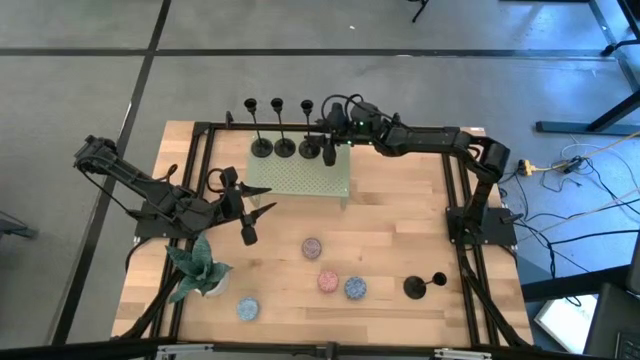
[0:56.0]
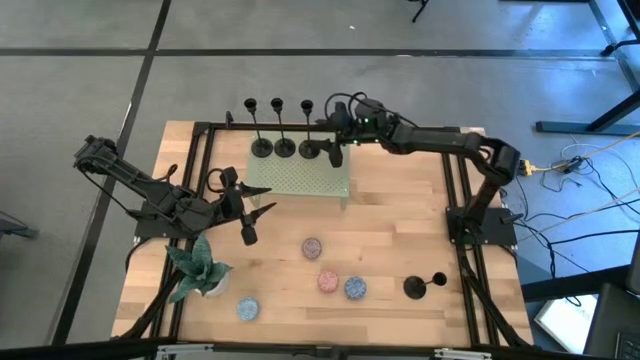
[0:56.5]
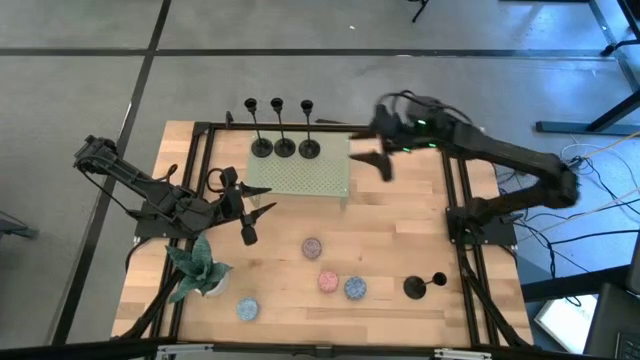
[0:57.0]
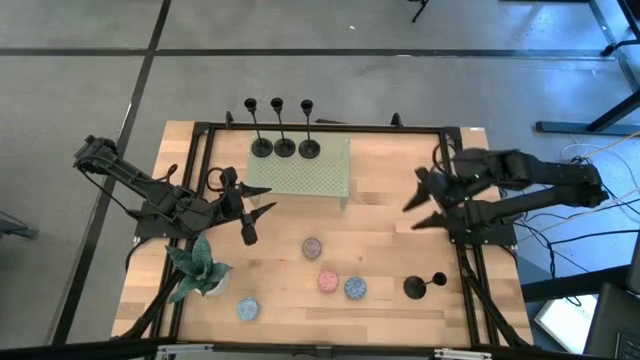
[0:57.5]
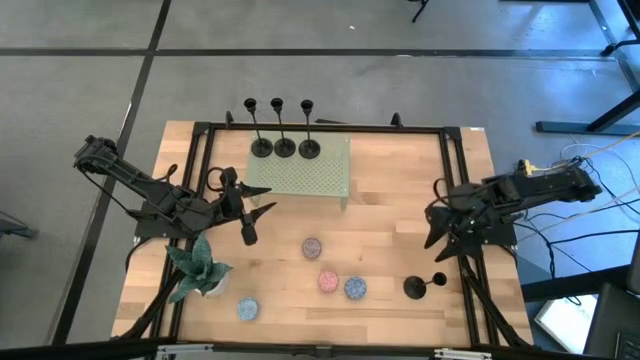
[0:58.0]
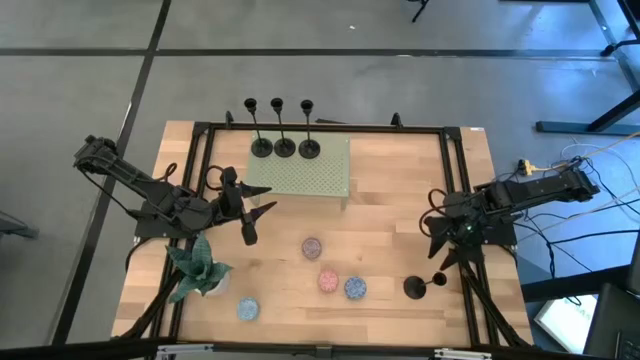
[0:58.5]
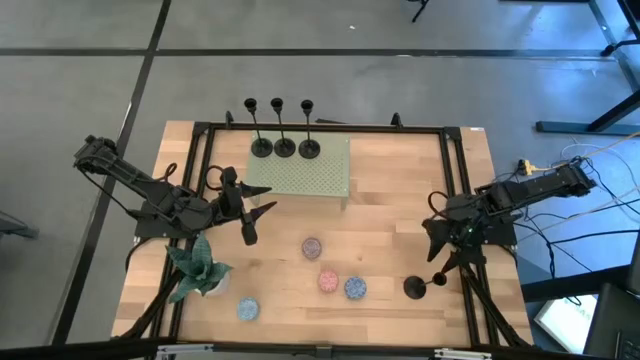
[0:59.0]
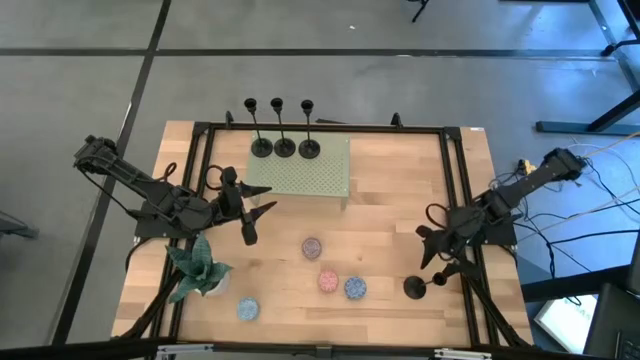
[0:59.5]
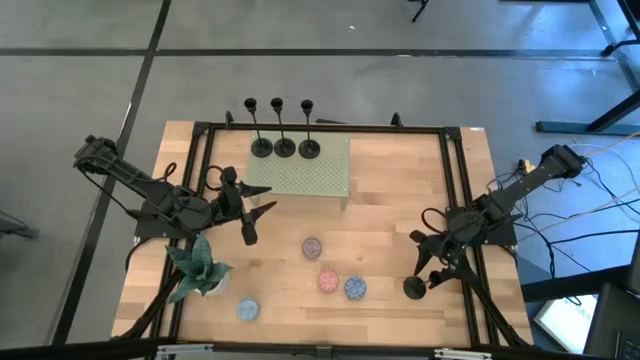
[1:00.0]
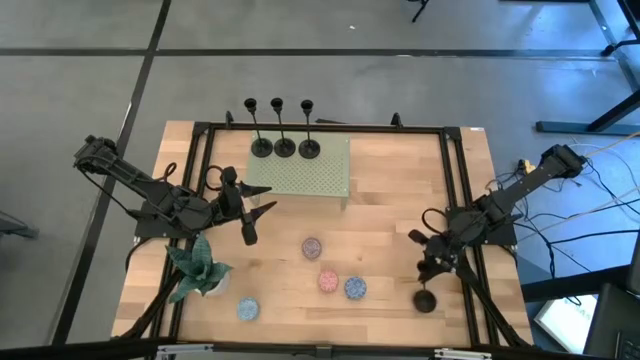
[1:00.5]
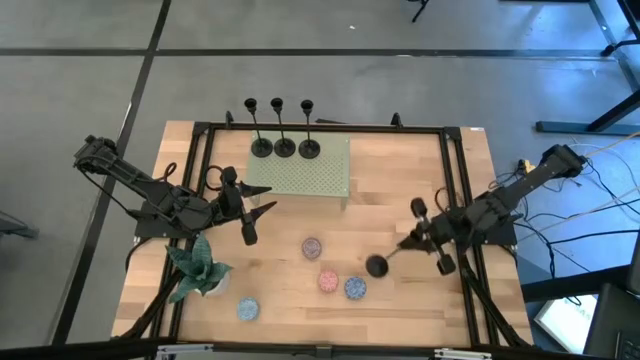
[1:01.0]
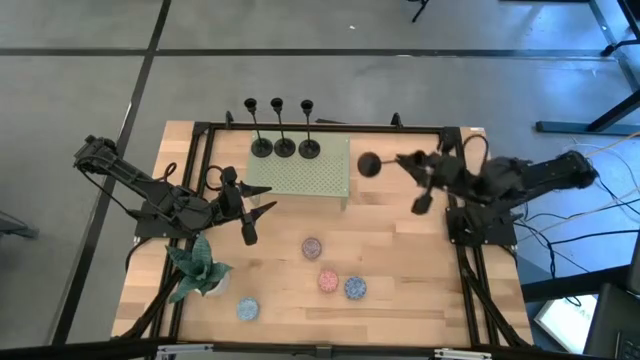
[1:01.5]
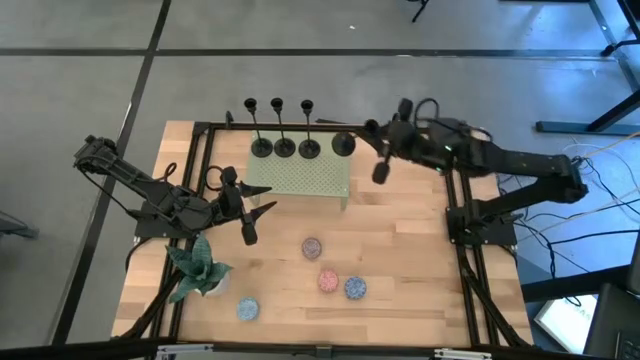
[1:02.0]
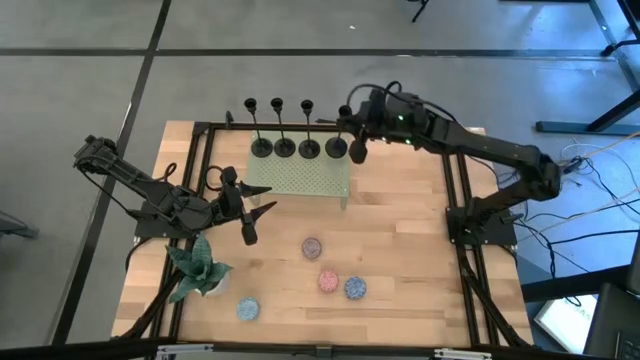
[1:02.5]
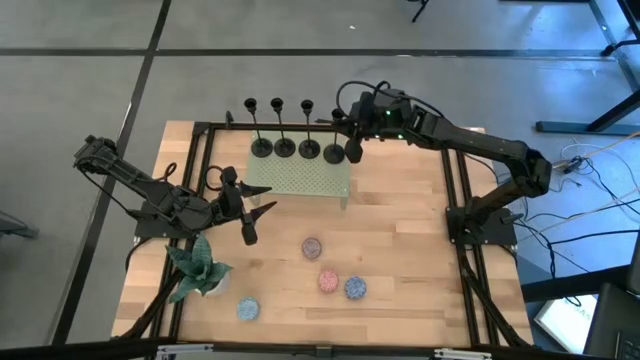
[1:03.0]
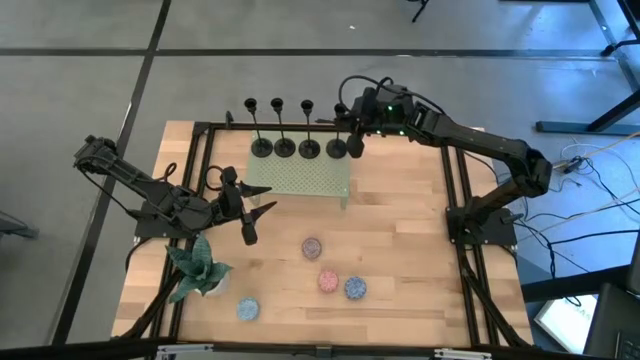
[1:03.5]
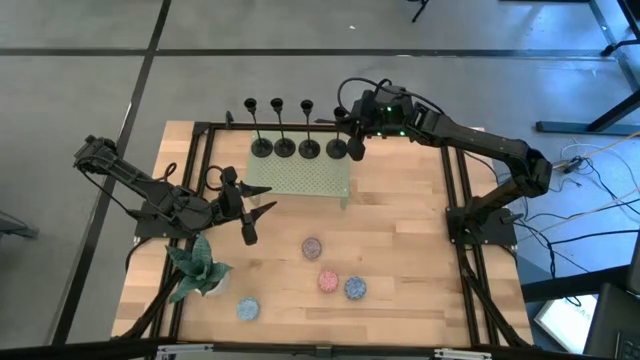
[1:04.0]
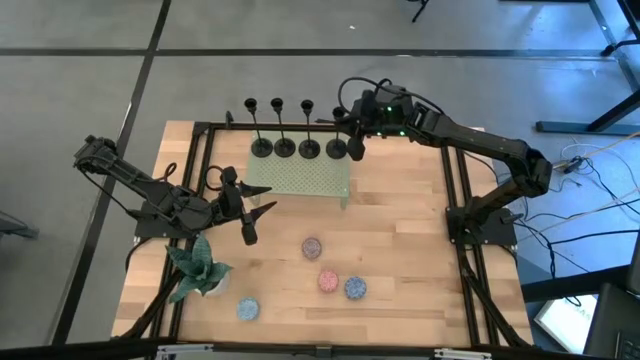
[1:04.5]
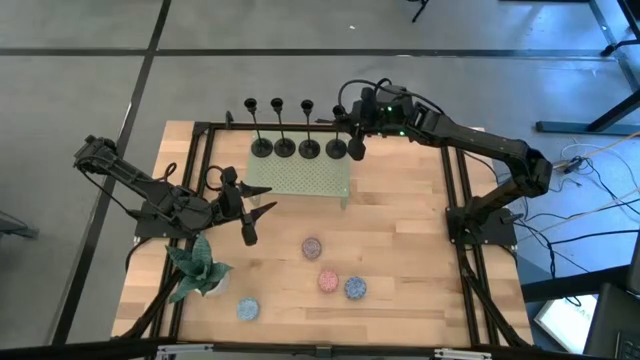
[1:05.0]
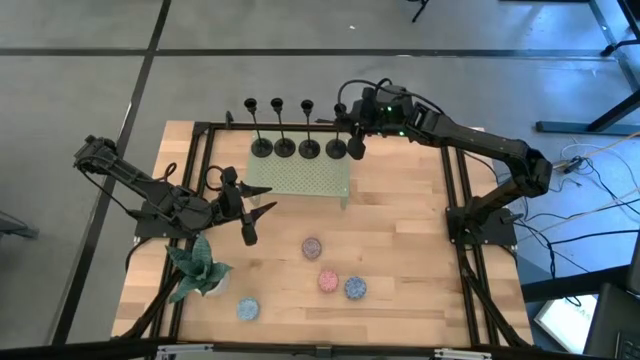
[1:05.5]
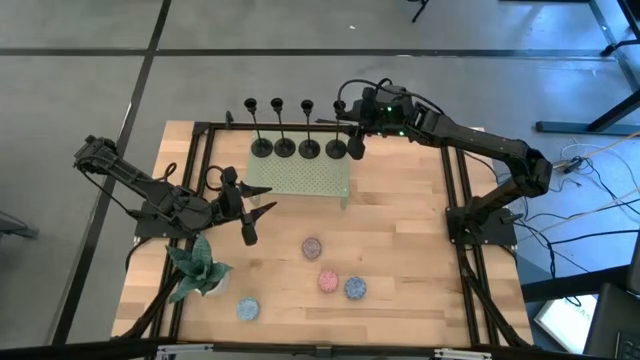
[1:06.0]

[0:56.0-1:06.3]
Task: Pick & Place candle stick holders
Align the black candle holder with the black candle holders on the shelf

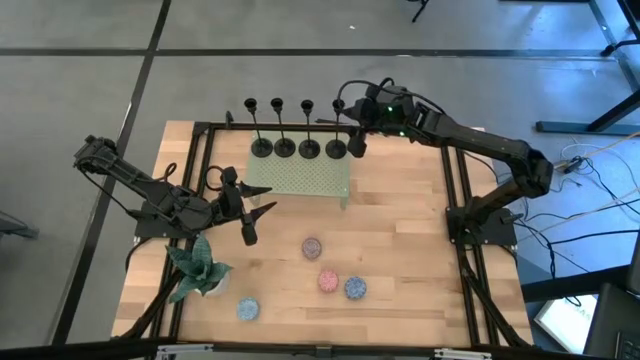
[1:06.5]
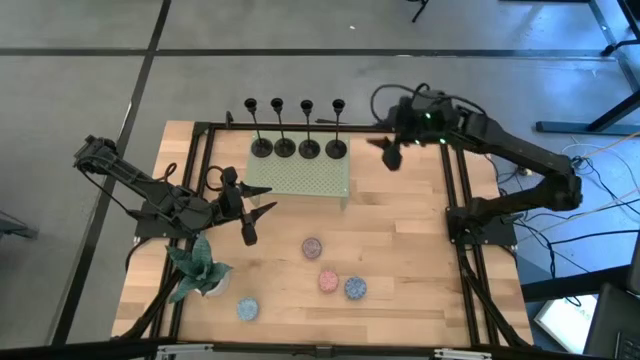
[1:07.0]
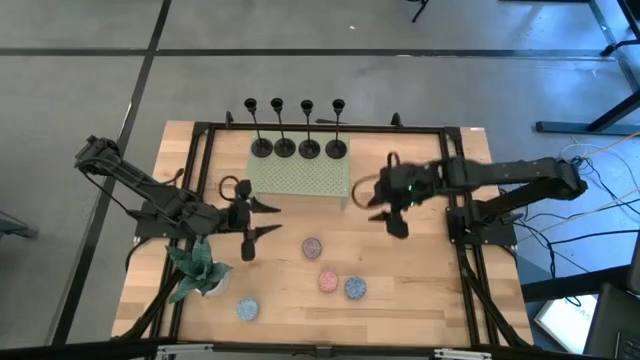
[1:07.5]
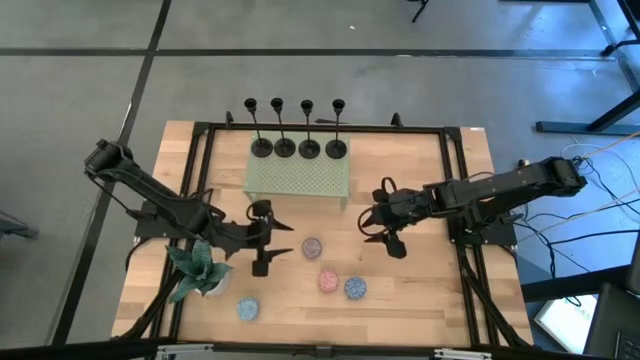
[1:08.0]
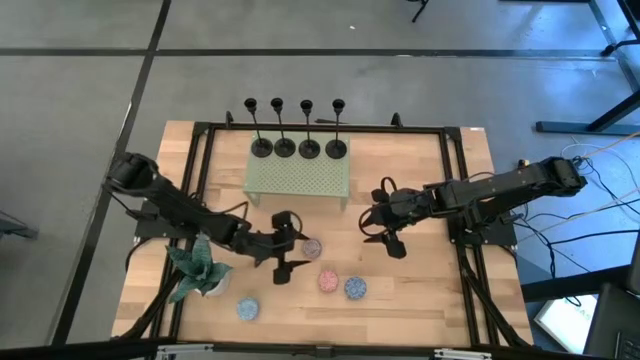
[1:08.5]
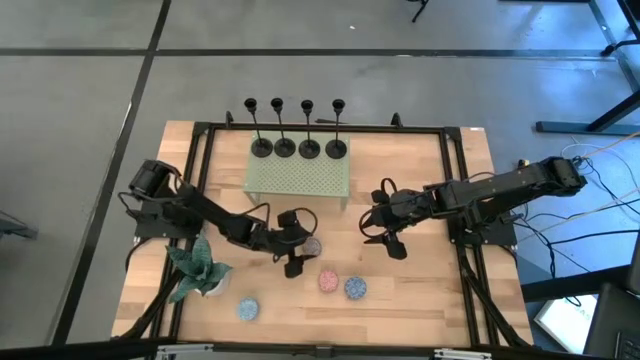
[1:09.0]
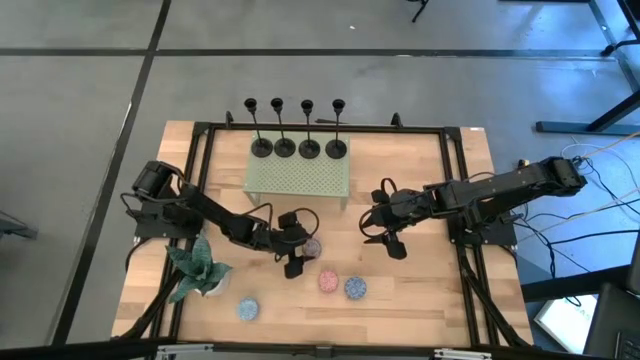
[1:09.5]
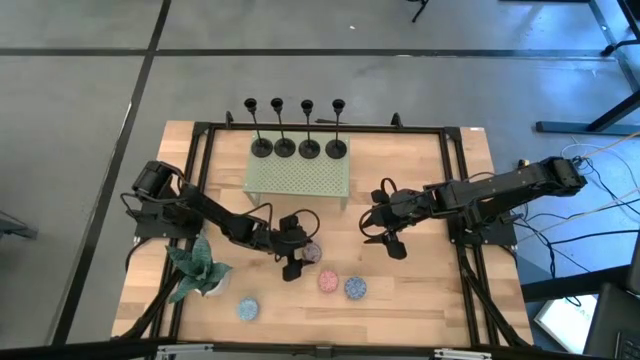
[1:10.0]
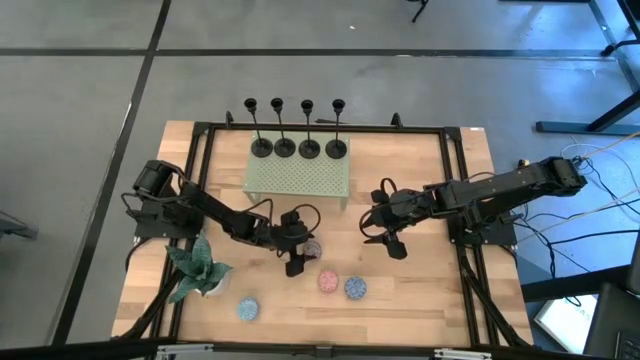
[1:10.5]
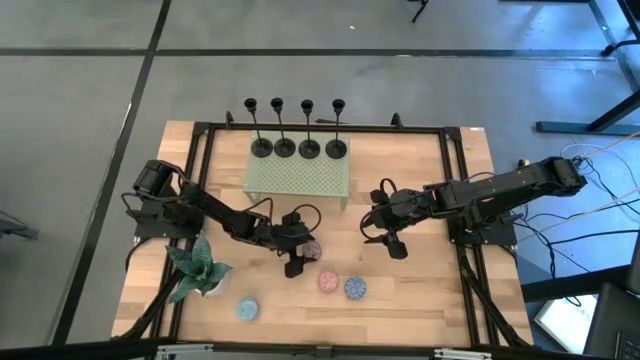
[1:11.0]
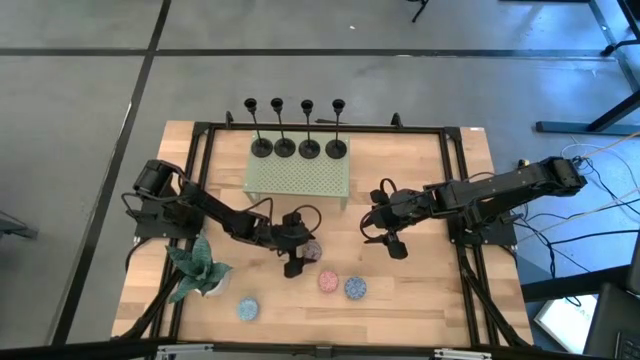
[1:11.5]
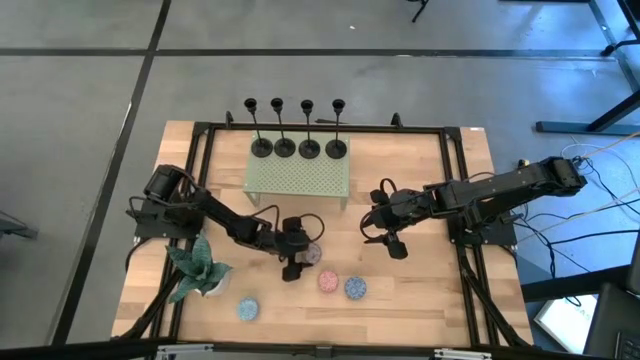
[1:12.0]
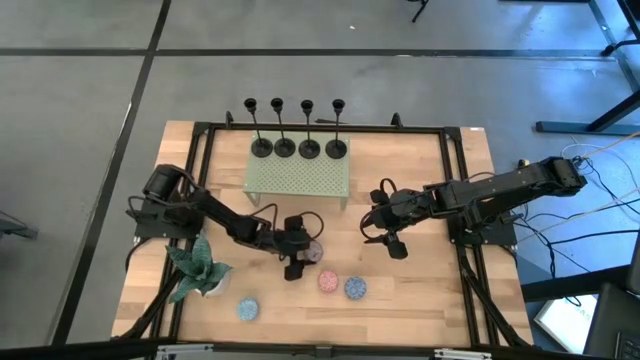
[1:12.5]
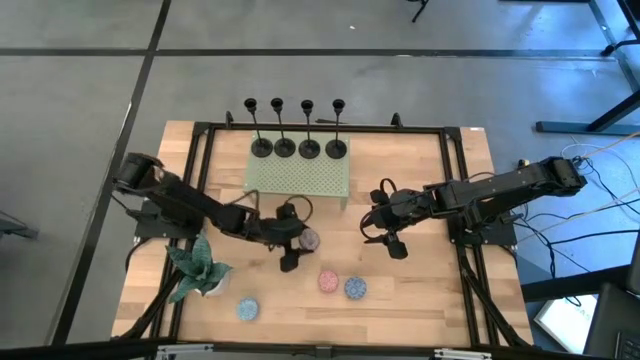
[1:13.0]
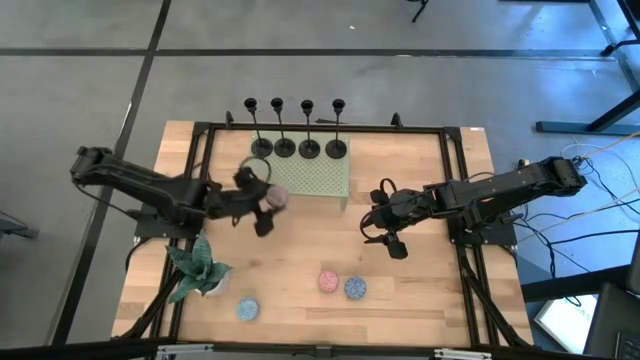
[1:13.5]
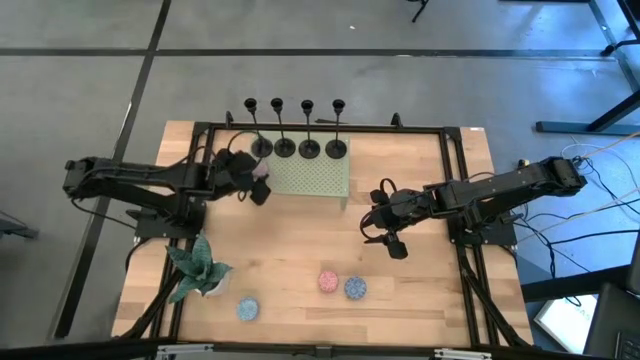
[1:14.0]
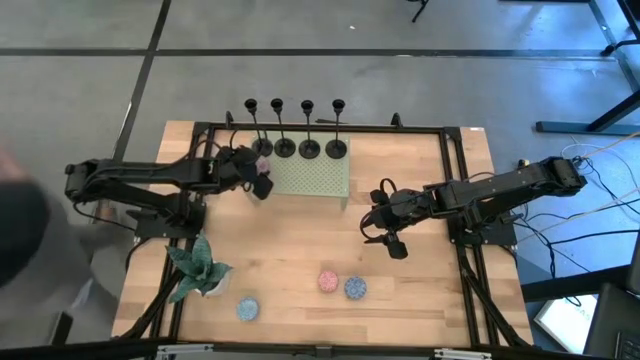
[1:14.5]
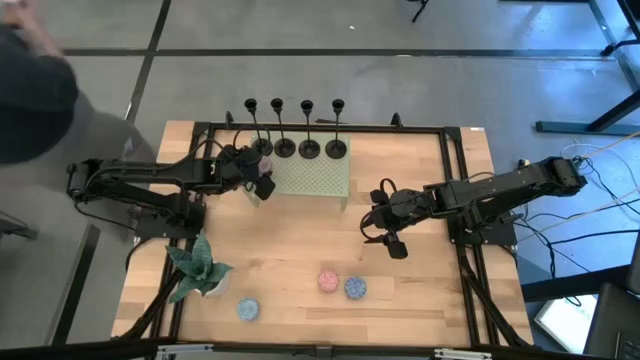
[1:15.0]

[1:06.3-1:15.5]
Put the red scented candle on the shelf
